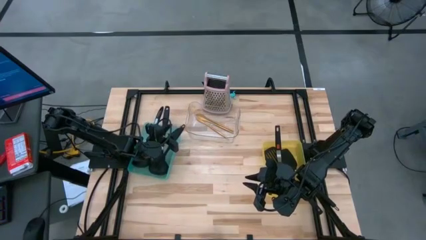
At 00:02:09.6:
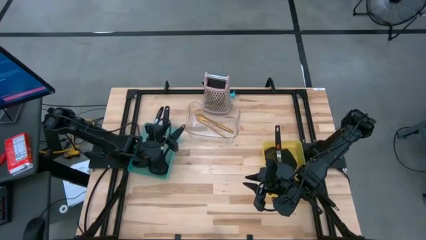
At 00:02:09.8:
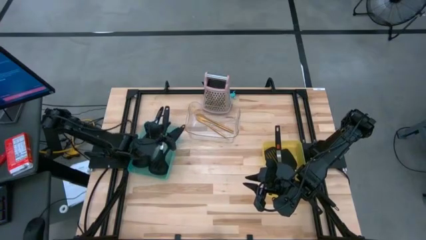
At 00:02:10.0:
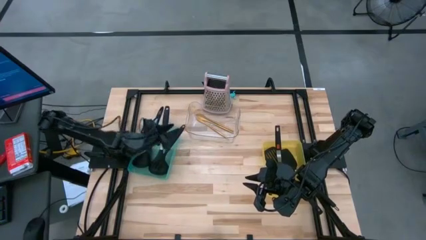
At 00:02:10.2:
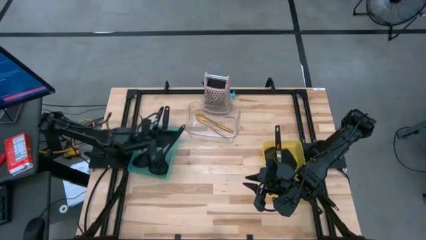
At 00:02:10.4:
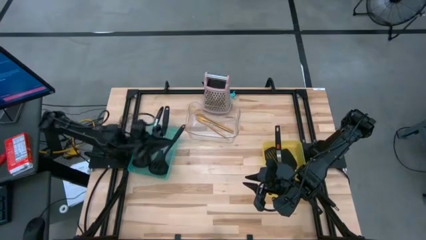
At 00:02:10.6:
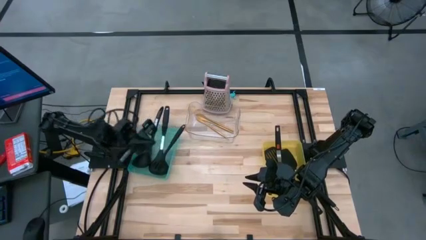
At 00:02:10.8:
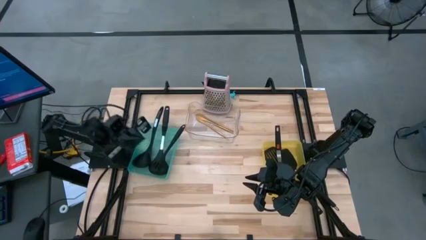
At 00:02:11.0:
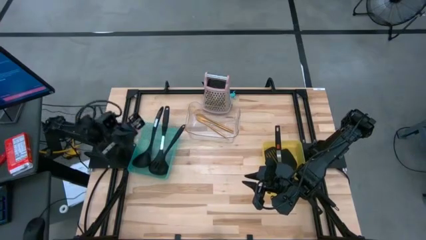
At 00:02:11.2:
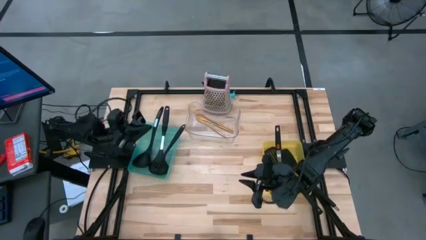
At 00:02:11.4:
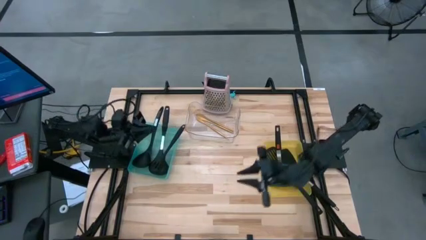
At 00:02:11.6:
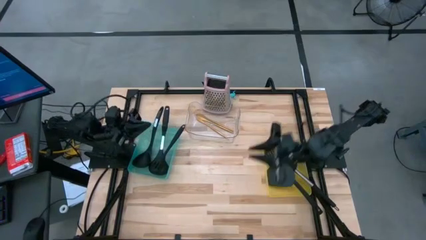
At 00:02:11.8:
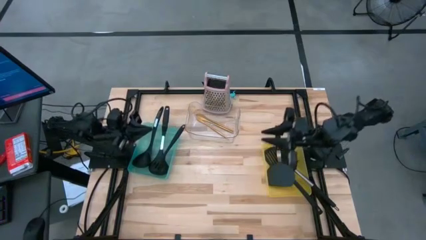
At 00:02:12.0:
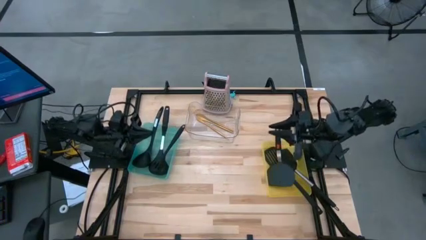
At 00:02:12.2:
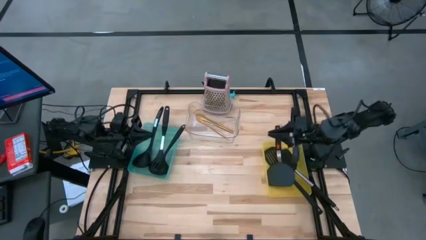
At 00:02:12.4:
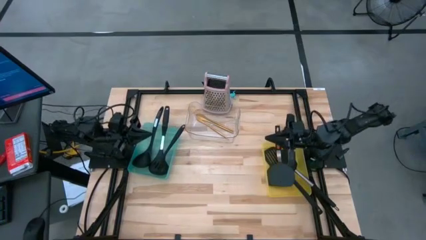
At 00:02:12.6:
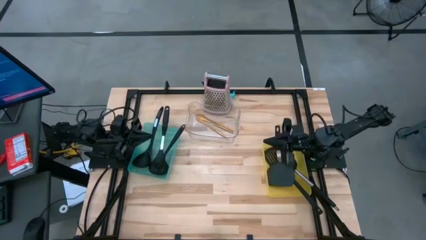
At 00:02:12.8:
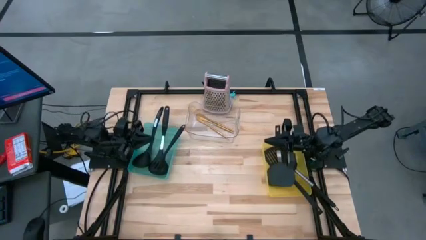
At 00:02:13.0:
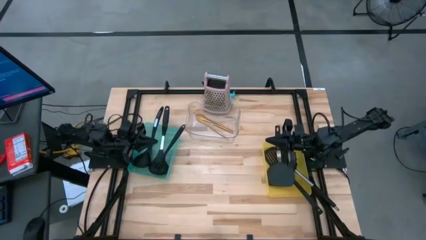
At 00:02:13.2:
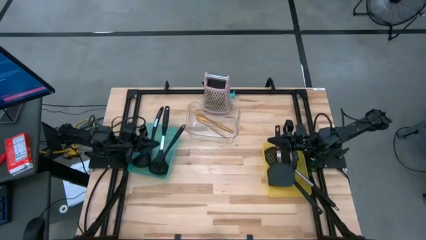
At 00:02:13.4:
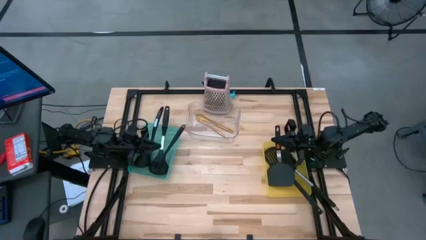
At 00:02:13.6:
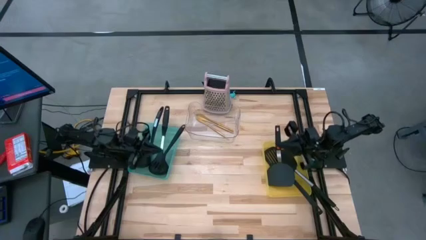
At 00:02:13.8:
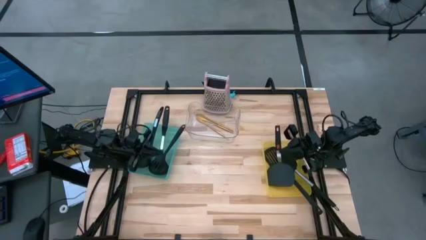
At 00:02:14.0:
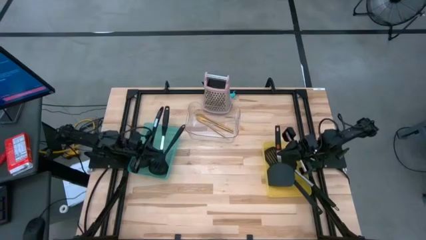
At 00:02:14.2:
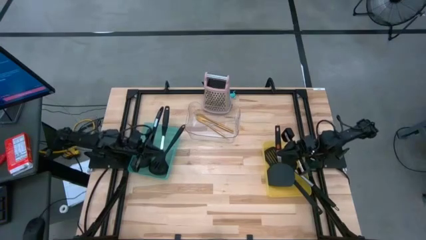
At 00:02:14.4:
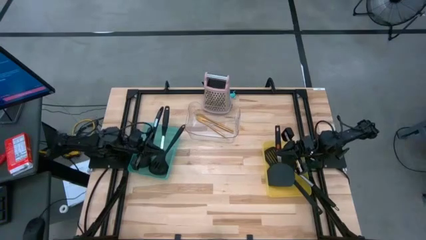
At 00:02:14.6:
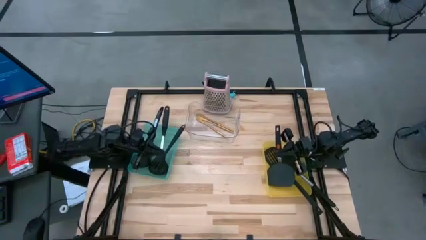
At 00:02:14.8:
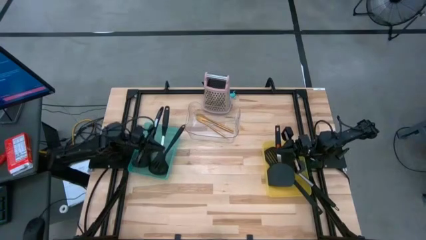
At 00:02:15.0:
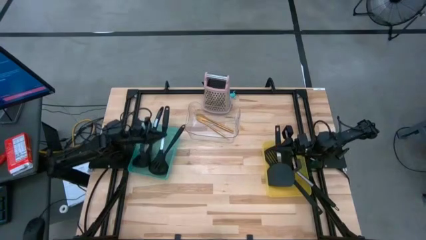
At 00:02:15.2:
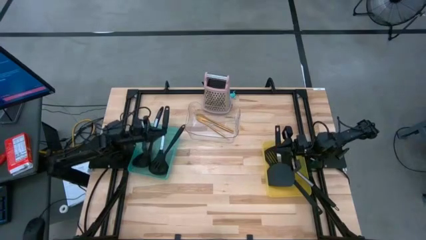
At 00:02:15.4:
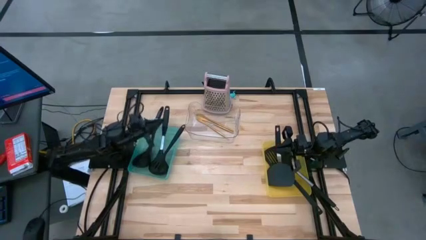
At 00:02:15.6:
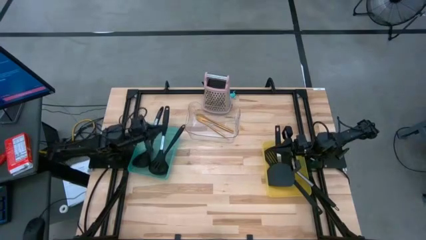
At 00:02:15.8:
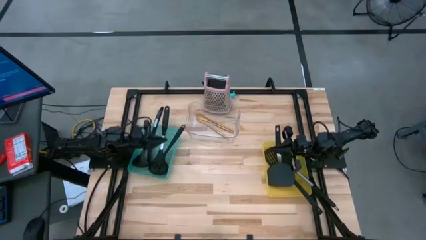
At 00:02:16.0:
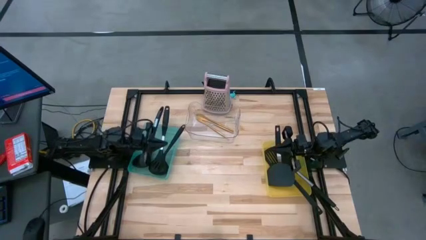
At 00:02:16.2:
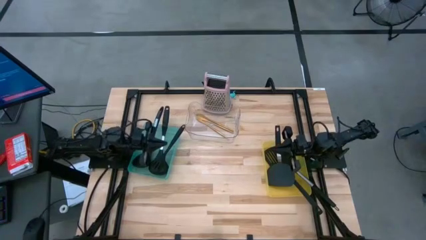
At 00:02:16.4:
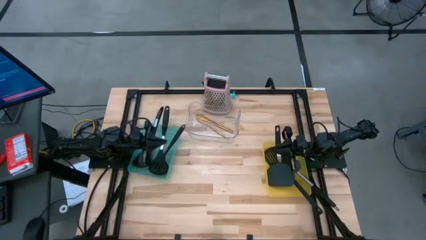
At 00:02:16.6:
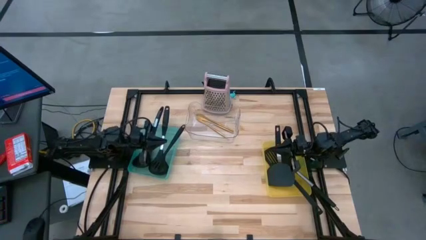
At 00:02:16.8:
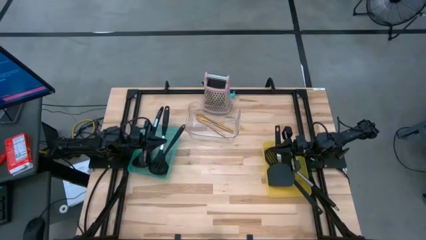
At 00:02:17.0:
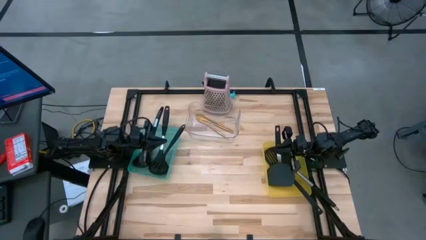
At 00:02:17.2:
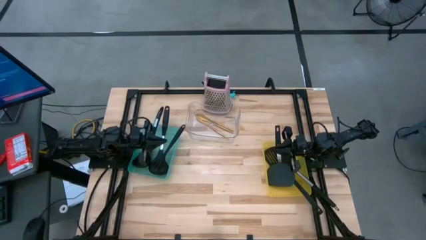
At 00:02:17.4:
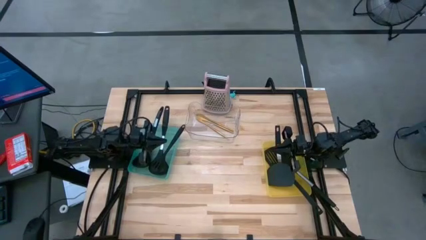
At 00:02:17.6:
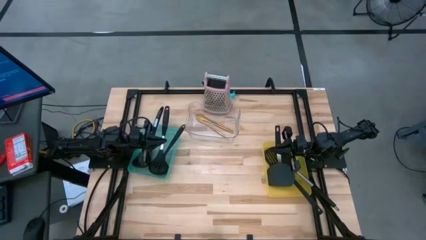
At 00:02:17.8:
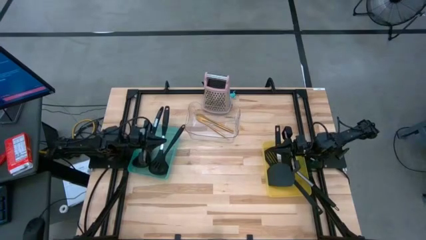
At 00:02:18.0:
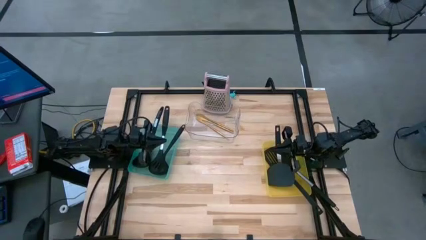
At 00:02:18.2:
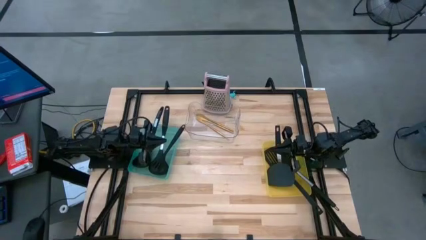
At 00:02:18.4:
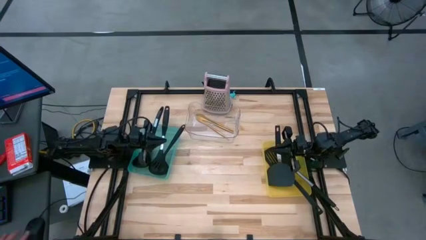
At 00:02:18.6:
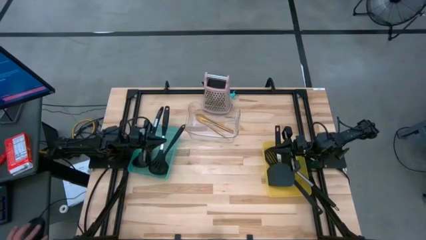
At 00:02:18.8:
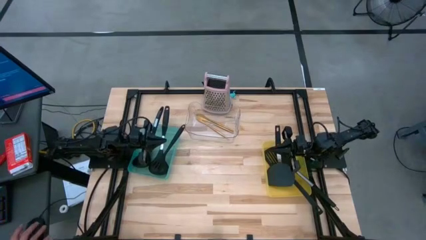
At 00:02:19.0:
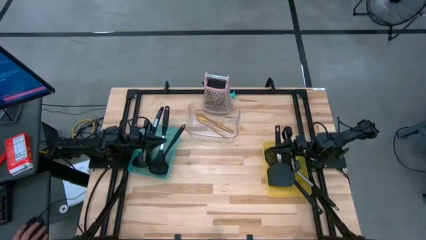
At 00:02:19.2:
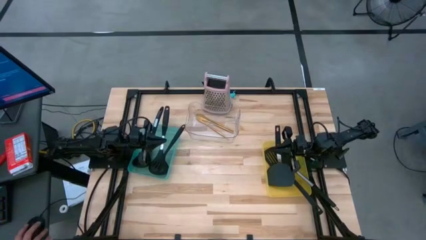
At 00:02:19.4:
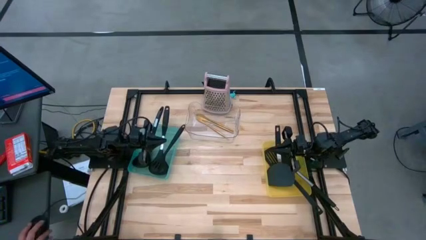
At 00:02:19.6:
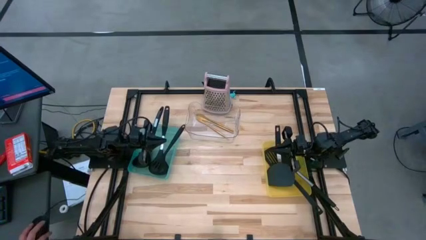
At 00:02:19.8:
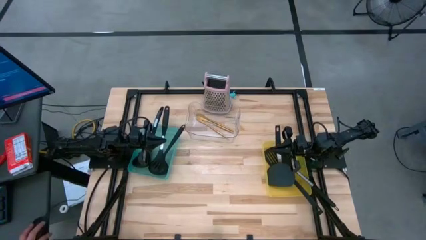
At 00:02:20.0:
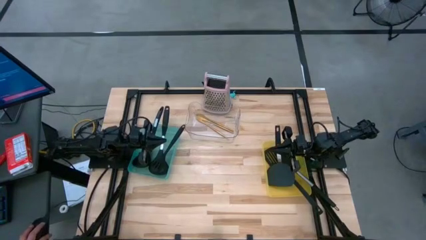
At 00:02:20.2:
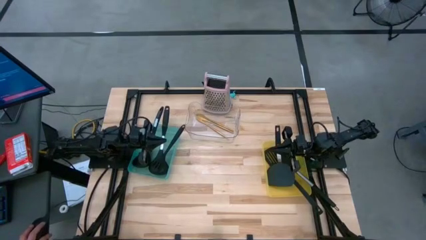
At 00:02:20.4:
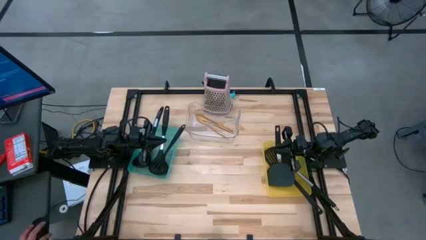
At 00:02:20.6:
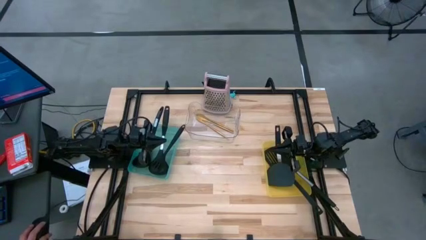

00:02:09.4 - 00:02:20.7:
Task: Pick & Place Kitchen Items
Return to Home Position
